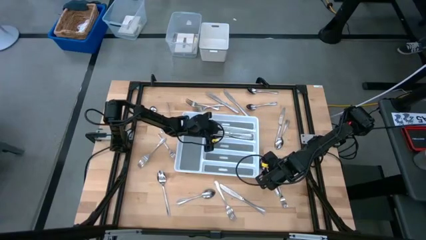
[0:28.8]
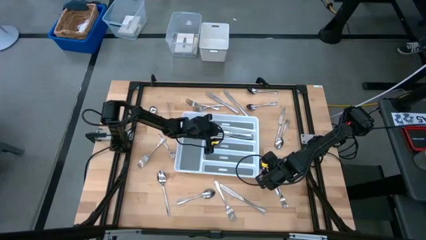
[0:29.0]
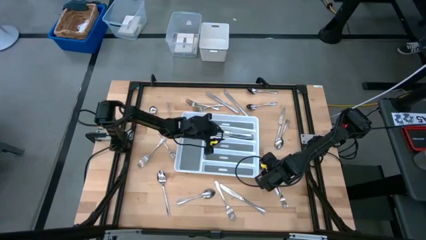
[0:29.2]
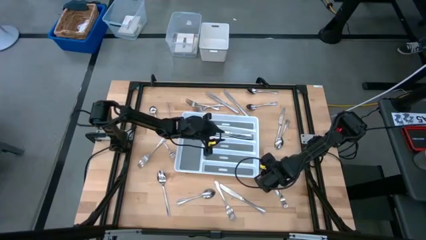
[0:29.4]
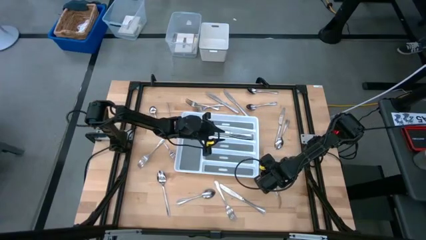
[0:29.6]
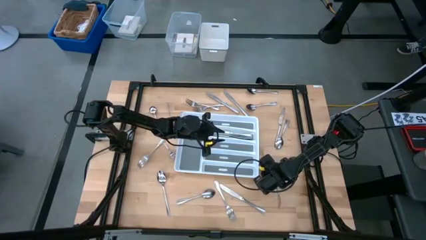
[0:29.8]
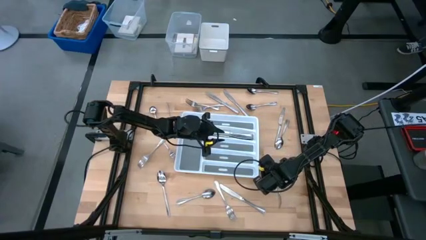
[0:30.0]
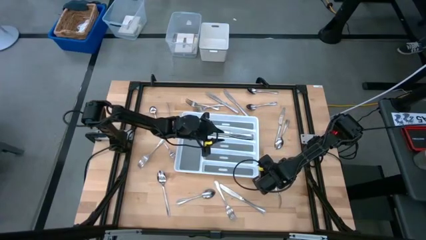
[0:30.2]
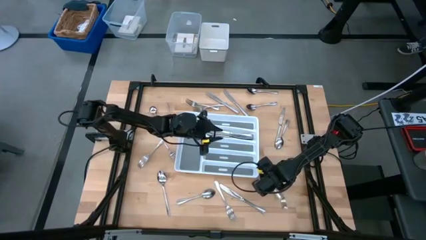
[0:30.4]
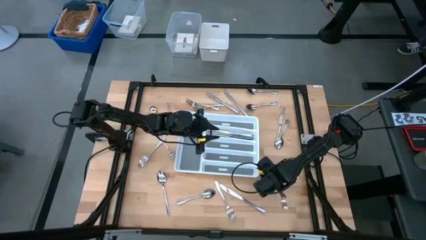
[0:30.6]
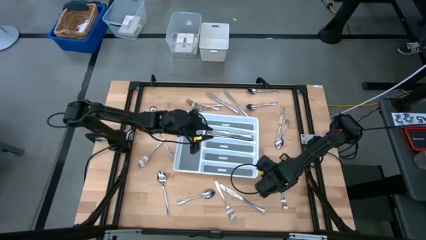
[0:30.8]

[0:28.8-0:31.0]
Task: Sort silverware
Put the spoon into the organizer tray

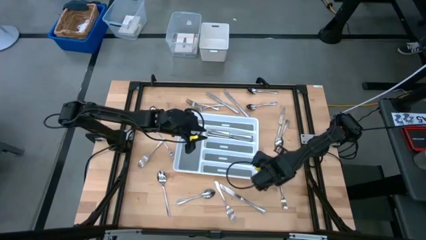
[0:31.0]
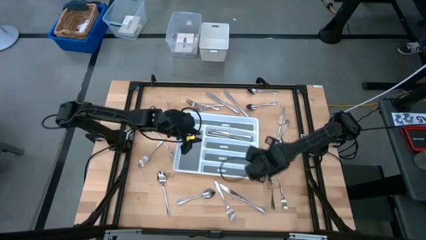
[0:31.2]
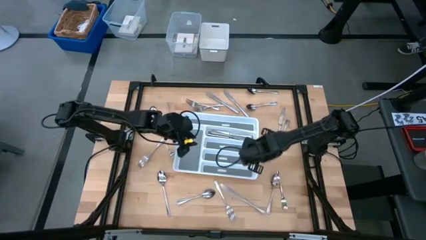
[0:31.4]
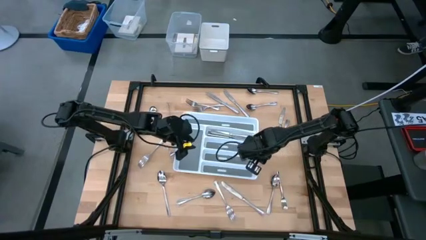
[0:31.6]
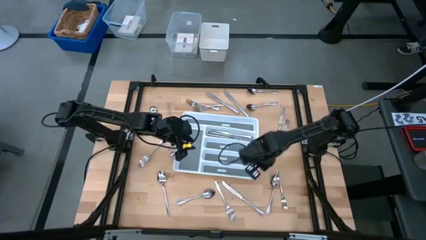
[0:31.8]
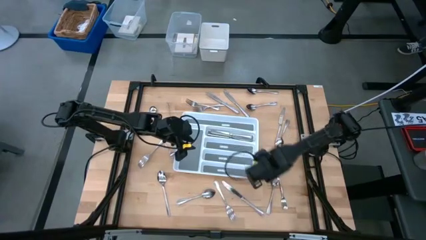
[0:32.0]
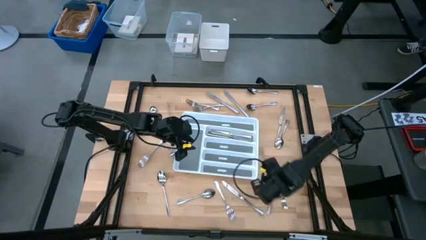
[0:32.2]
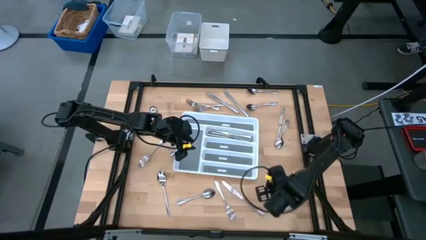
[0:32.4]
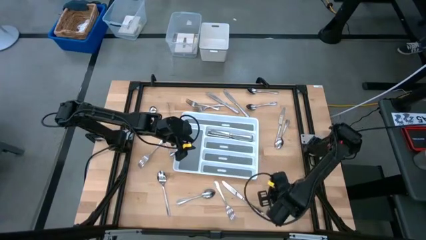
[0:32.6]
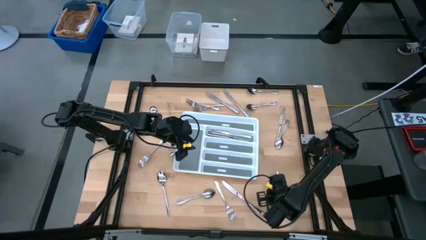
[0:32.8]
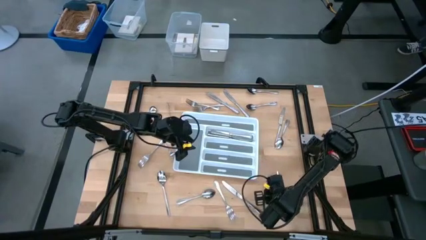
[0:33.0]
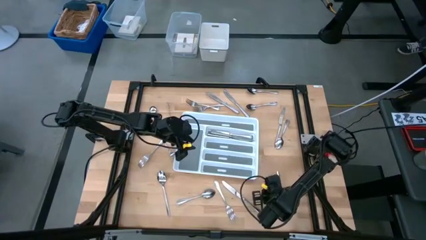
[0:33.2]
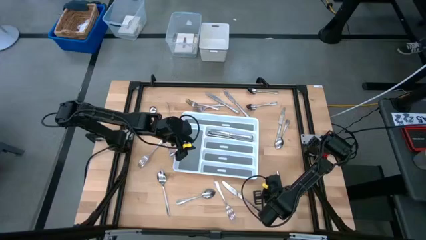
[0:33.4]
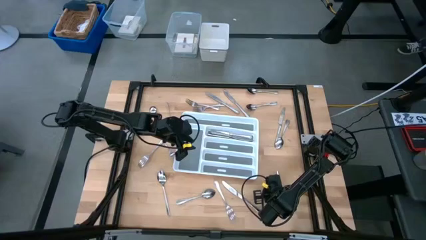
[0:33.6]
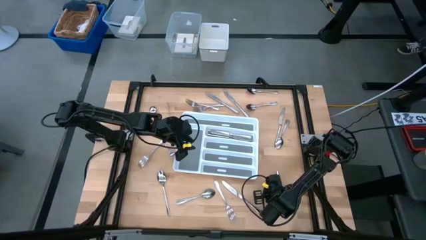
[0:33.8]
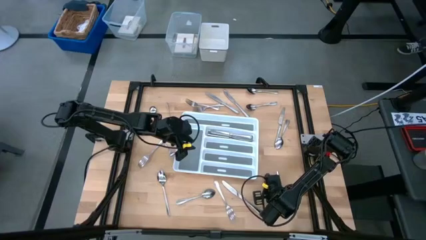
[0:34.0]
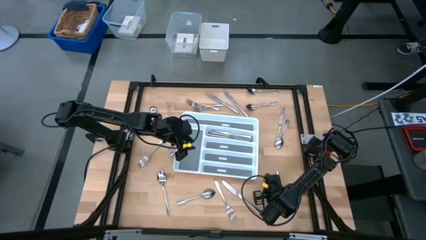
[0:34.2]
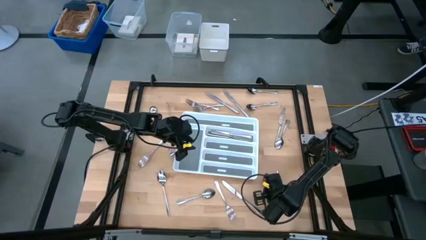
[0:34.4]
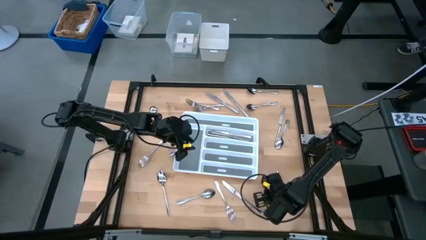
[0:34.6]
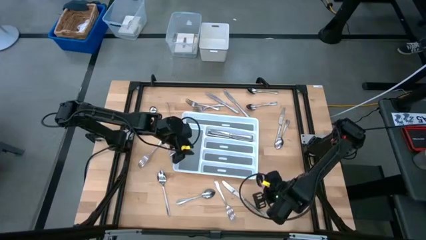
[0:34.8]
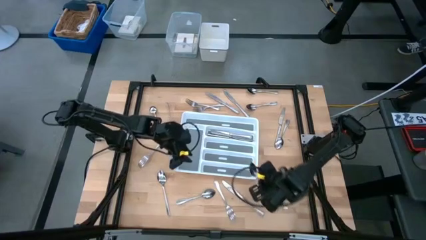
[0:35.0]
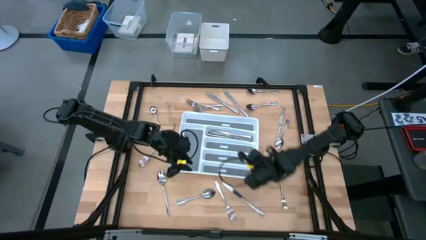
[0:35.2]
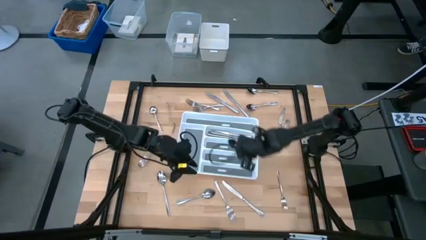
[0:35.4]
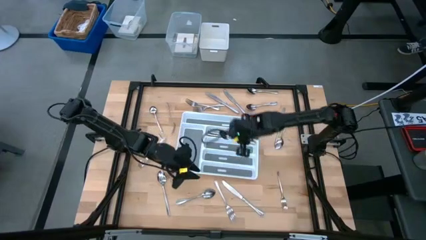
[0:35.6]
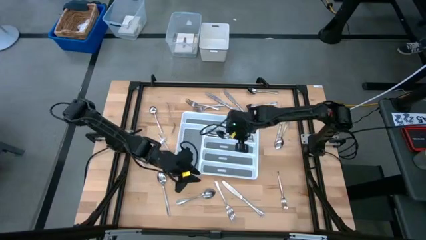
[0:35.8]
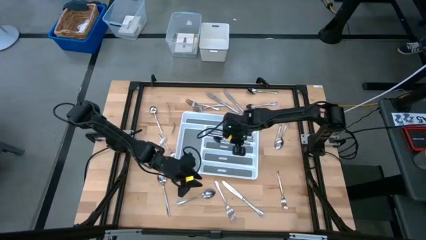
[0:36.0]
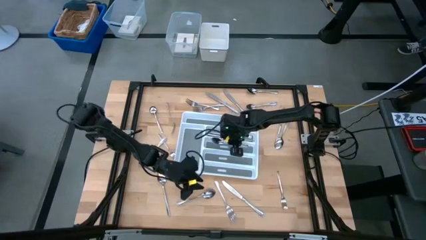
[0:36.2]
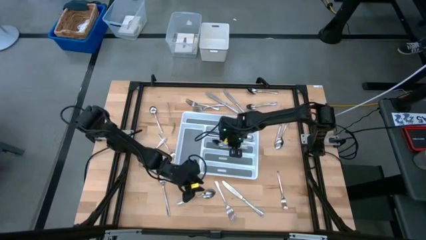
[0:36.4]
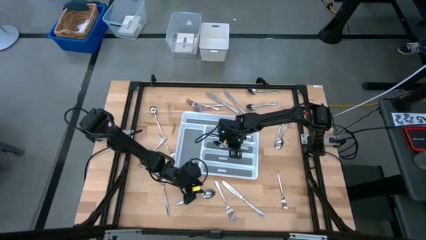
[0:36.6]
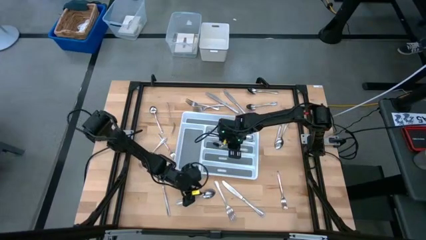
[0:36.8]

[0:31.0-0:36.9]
Put the spoon into the organizer tray

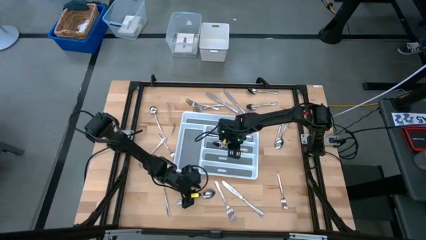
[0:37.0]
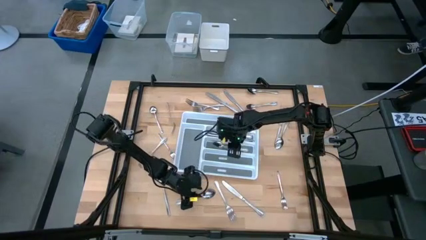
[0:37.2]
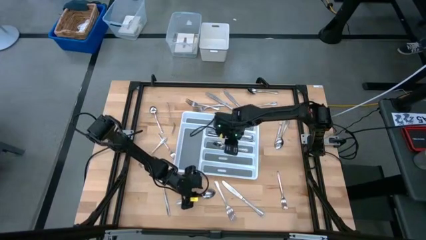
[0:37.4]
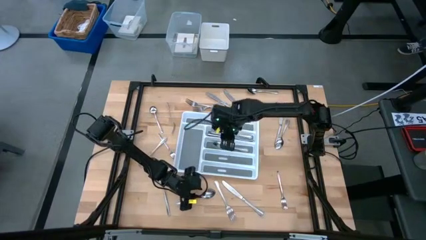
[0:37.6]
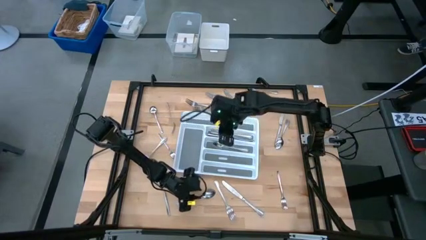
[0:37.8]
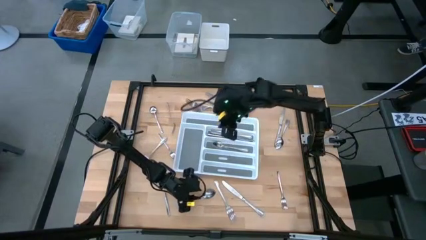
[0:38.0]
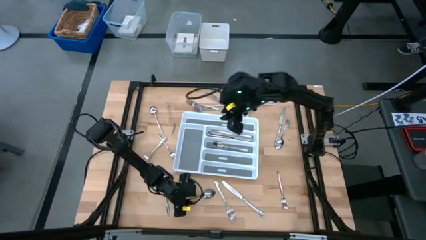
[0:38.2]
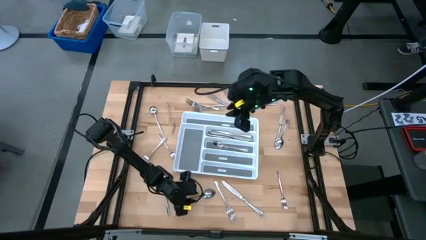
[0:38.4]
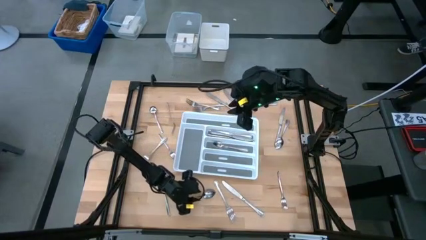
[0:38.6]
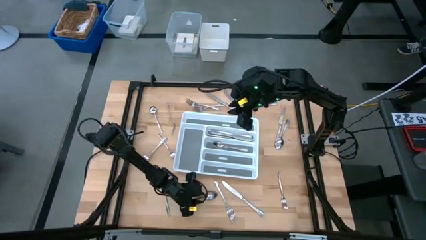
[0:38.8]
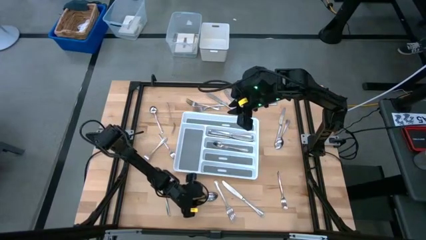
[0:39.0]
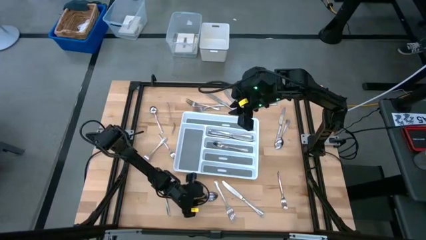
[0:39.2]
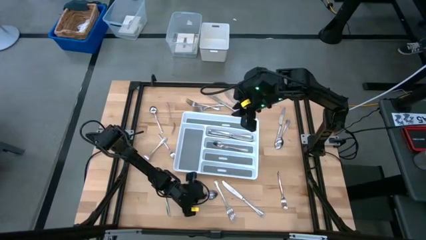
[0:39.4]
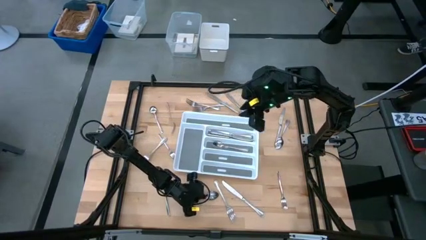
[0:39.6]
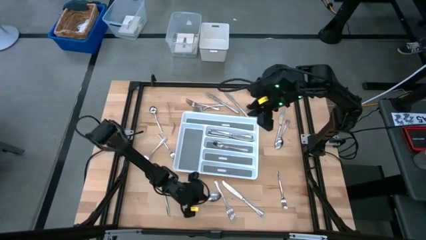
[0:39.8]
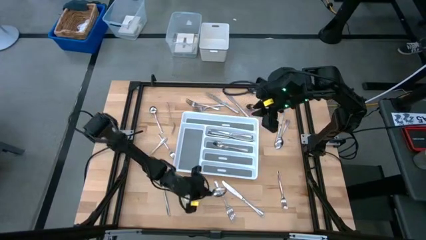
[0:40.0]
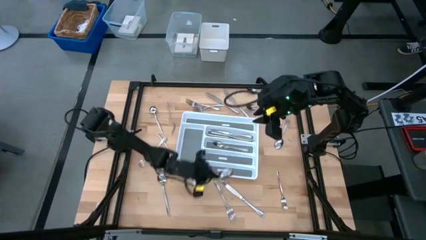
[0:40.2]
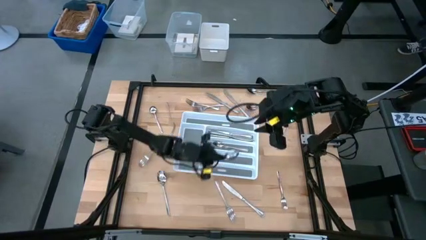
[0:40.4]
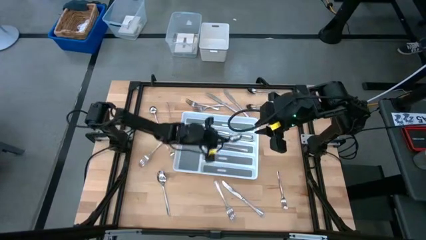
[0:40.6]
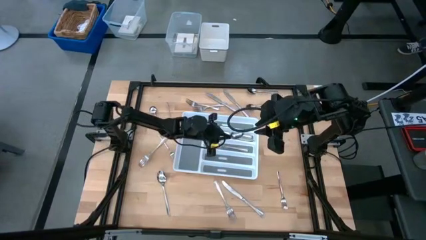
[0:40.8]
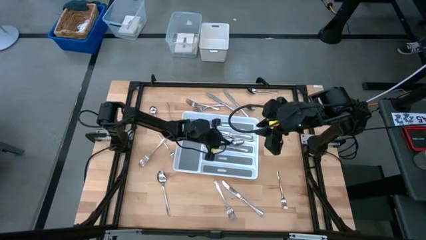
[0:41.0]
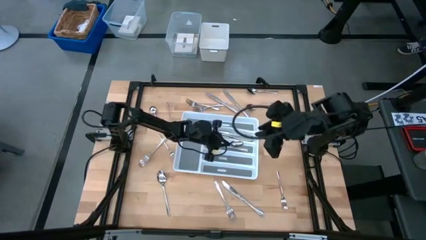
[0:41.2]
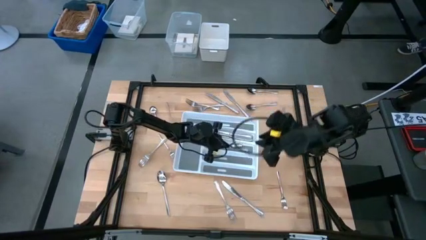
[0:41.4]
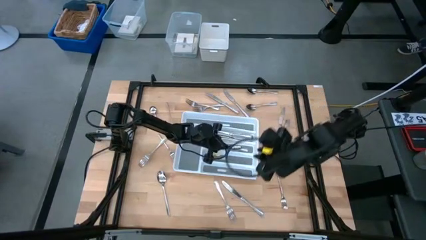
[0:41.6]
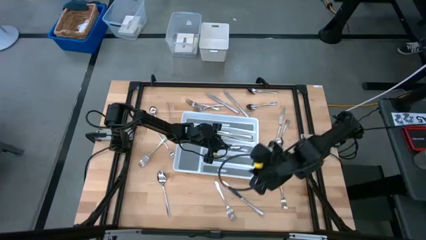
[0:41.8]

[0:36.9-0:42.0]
Put the spoon into the organizer tray
